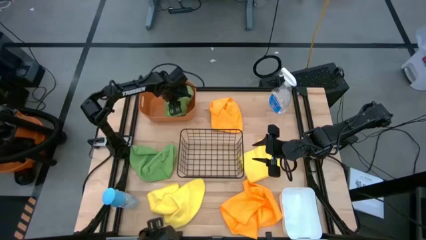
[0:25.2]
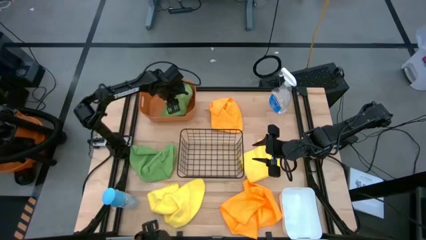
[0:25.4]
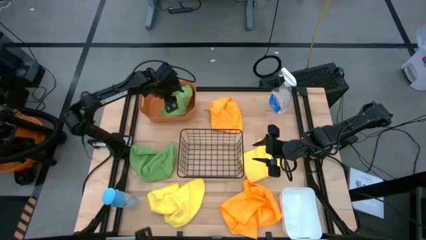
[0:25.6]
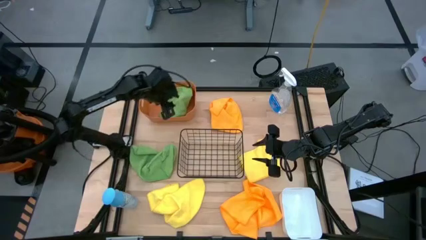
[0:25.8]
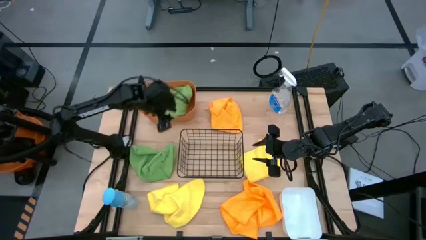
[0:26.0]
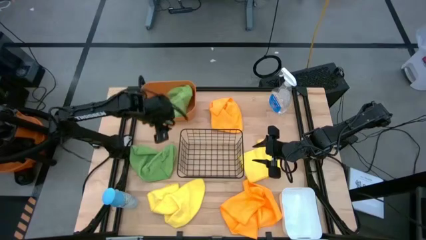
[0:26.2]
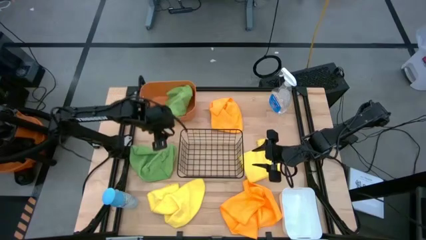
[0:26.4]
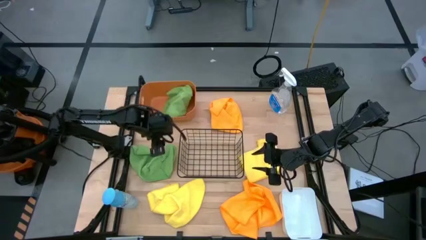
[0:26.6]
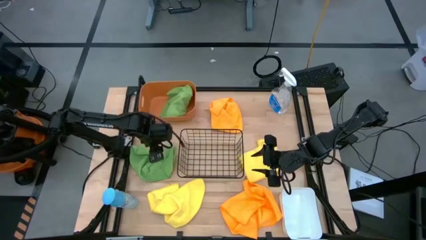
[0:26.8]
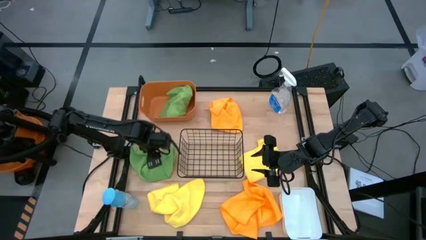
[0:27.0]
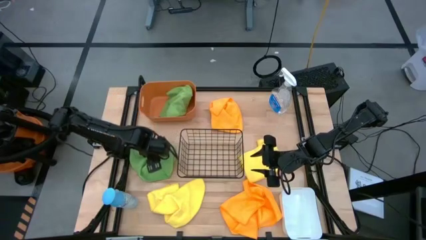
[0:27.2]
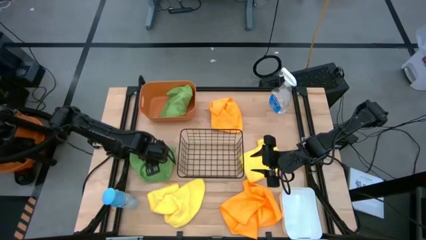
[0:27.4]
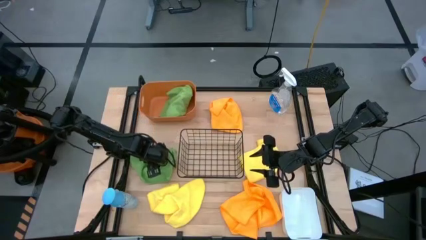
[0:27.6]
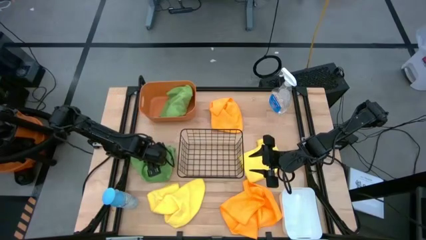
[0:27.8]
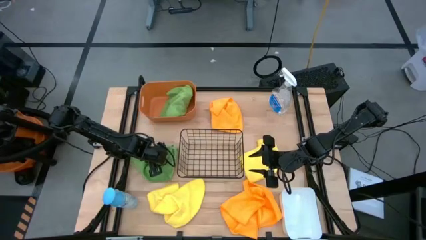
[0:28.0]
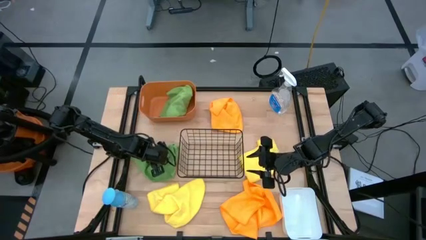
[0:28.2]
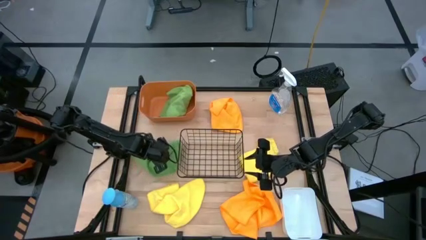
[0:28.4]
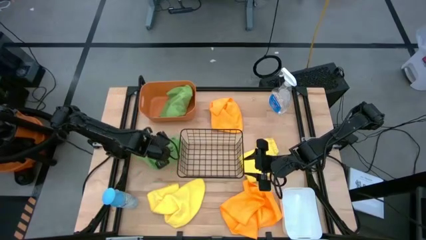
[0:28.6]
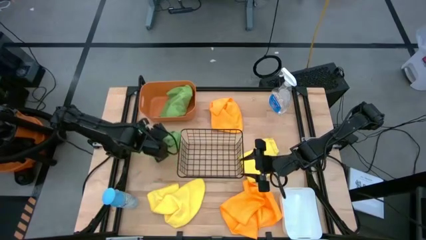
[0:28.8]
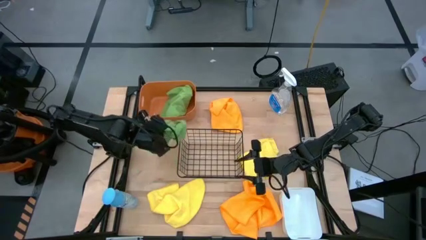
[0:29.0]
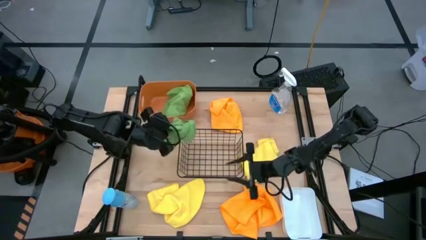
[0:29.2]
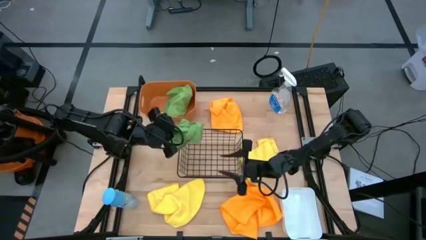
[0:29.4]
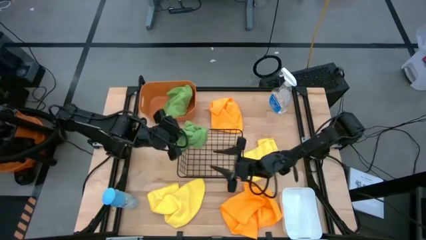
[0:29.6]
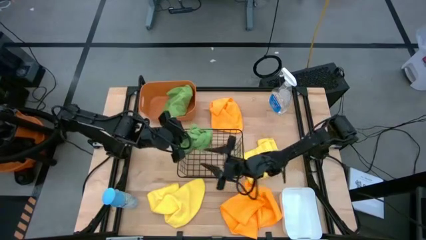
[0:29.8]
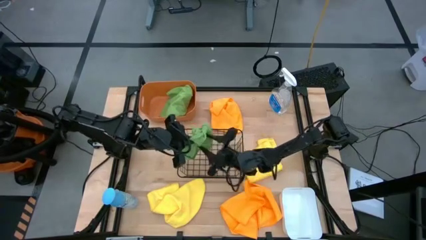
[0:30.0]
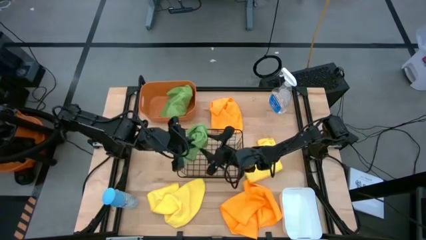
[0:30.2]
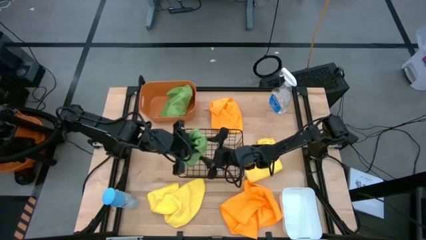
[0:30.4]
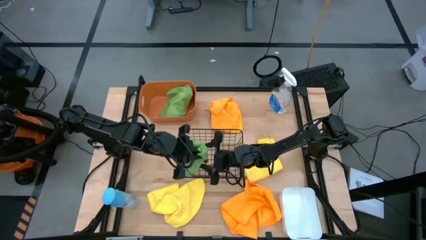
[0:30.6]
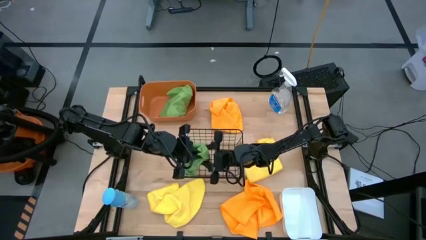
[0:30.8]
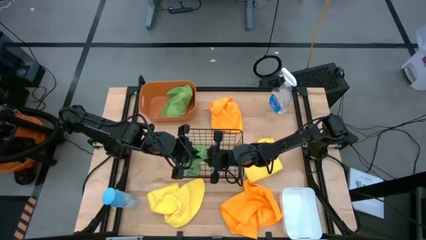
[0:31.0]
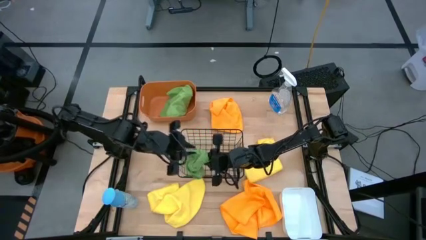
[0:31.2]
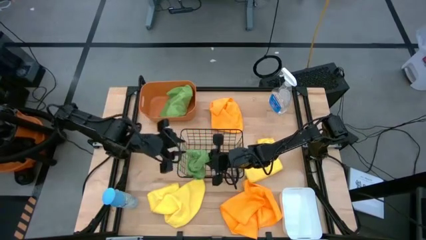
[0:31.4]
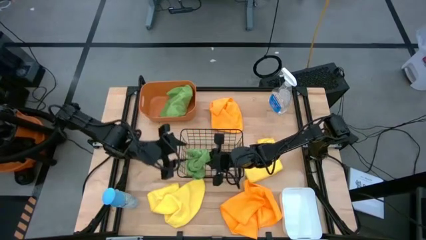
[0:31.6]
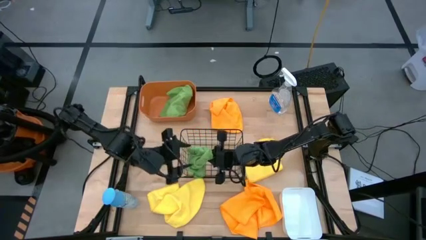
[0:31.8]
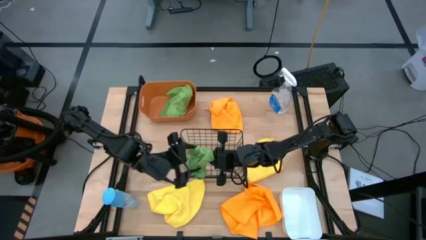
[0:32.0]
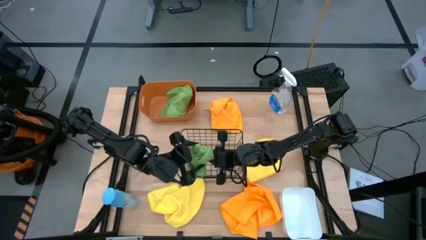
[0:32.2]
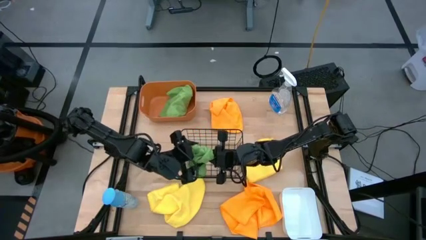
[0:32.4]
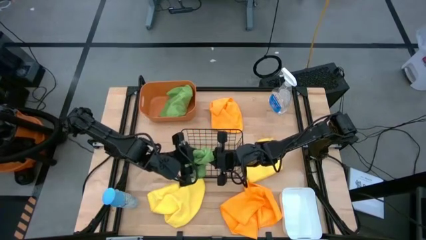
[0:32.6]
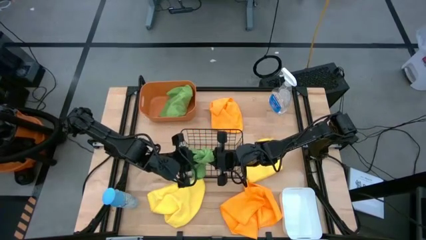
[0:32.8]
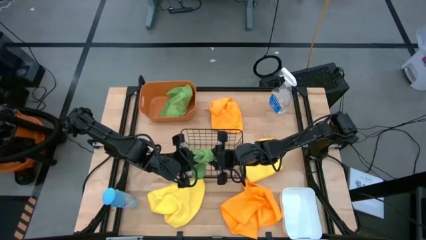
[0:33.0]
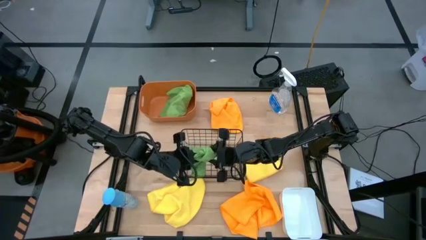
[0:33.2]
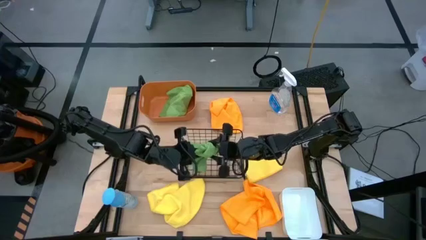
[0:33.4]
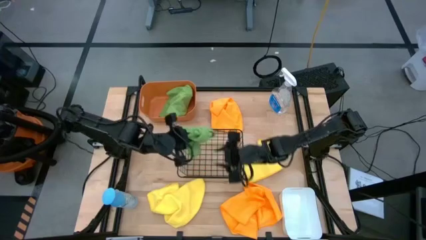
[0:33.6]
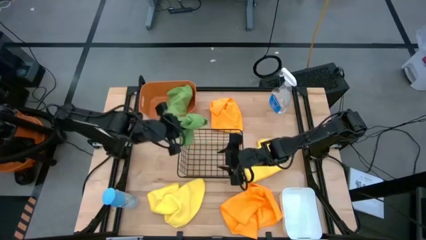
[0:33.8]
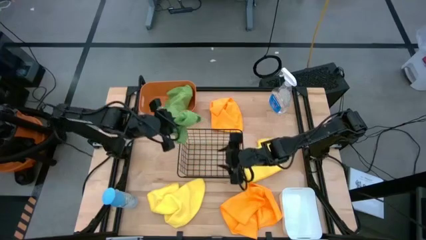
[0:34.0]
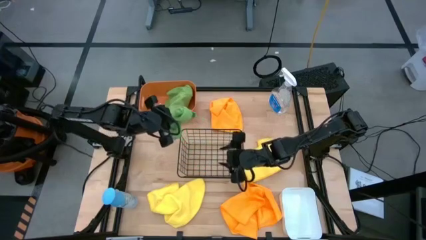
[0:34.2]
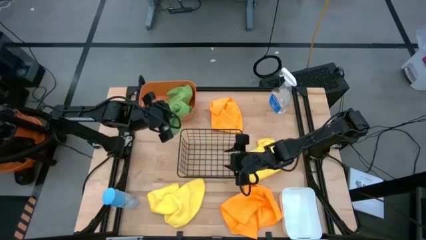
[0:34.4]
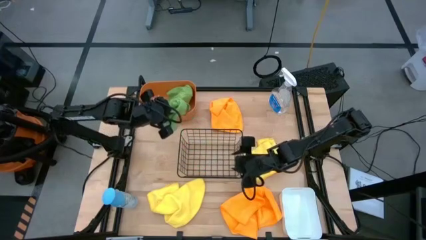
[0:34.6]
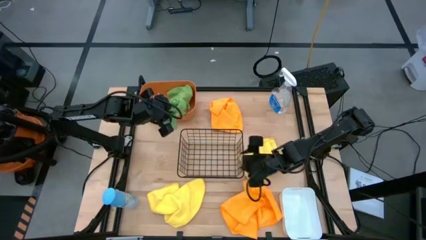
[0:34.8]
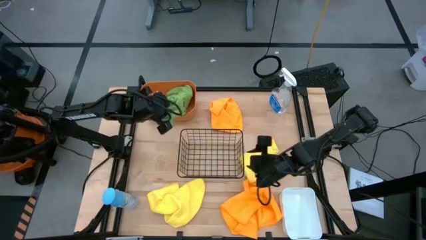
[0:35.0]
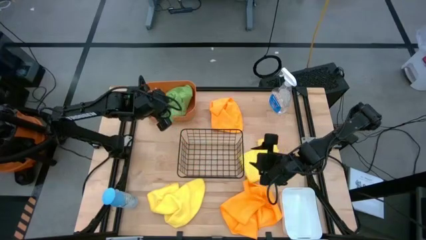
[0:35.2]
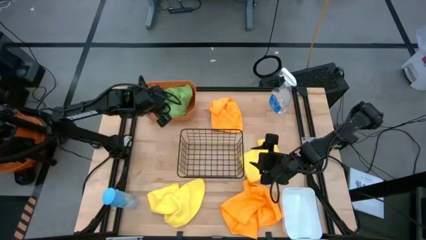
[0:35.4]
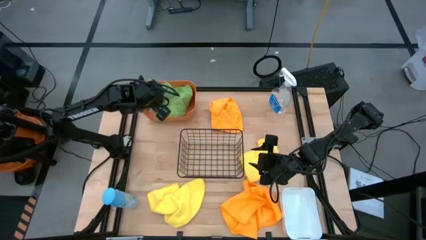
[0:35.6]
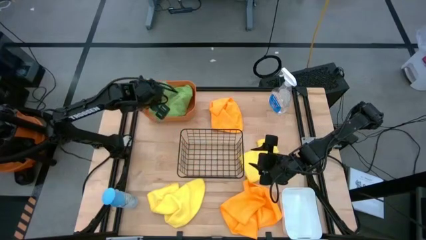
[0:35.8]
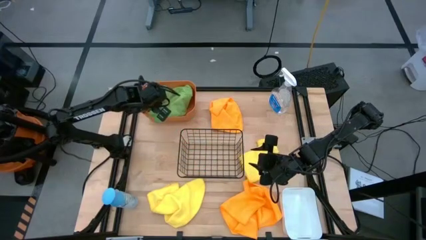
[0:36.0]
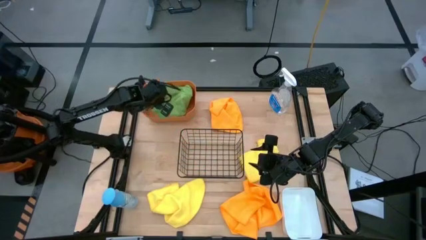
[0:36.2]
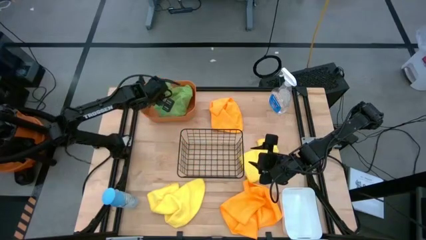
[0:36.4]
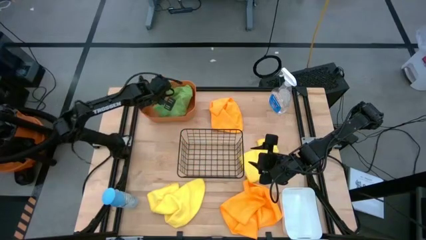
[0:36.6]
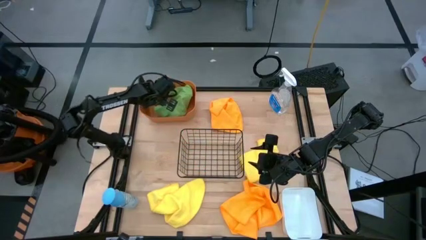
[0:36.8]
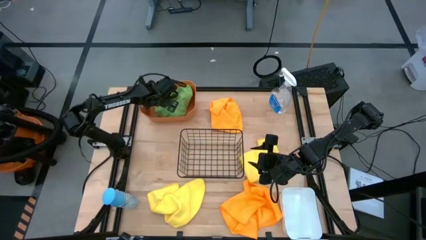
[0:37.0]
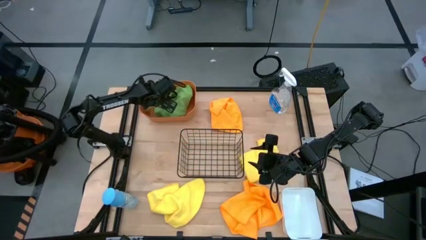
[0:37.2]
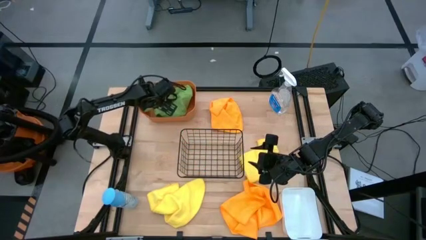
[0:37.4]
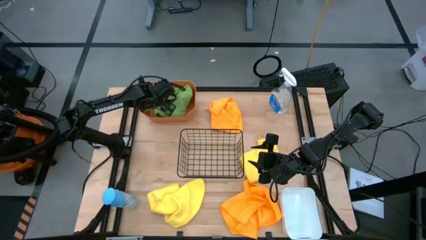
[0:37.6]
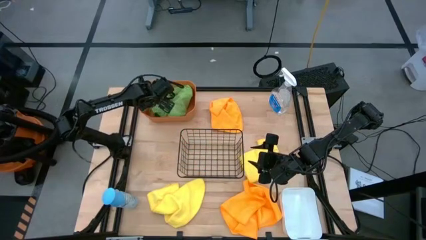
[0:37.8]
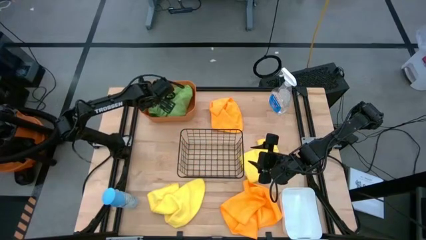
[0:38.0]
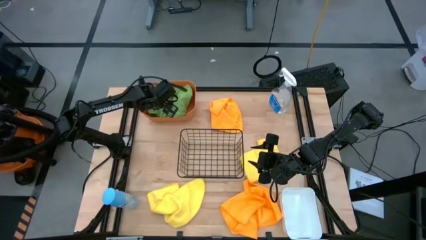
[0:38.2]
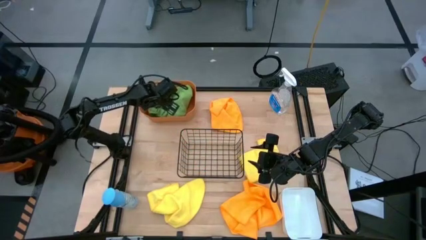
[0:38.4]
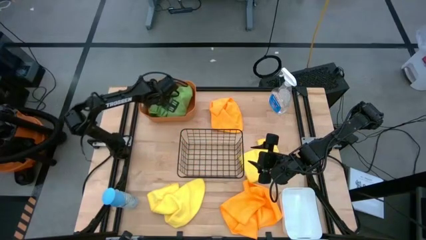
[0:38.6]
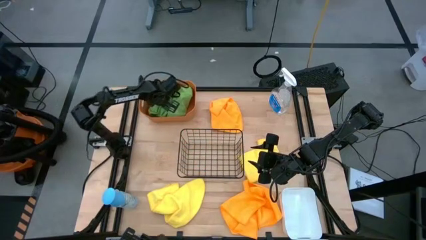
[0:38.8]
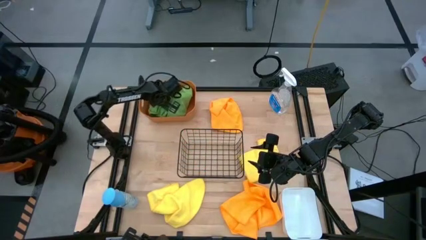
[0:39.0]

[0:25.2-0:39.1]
Task: Sort microfiber towel by color & place in baskets
Put the green microfiber cloth into the orange bin

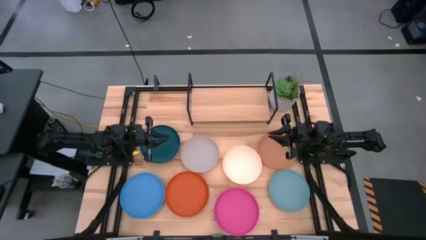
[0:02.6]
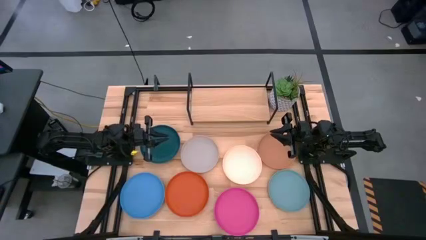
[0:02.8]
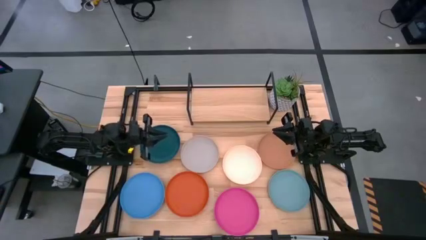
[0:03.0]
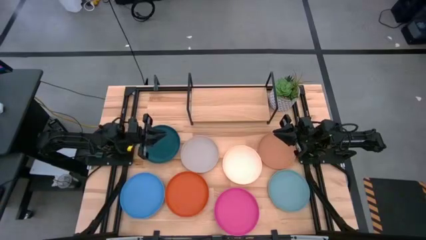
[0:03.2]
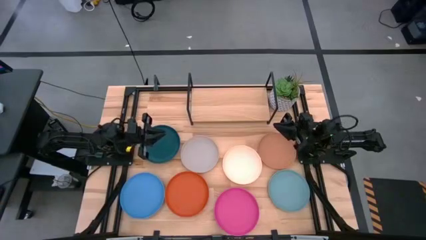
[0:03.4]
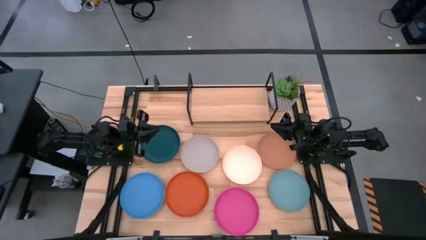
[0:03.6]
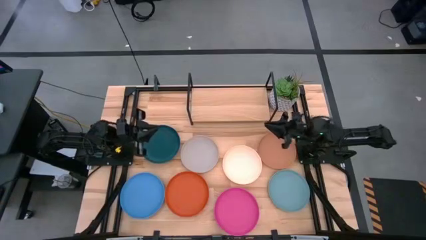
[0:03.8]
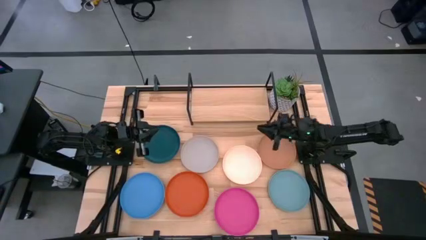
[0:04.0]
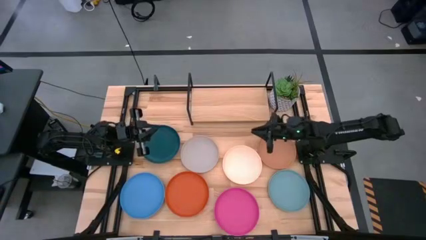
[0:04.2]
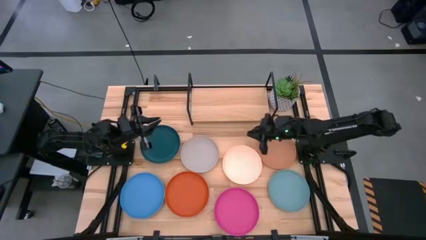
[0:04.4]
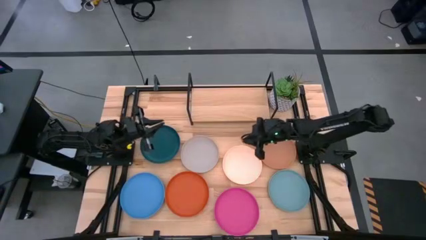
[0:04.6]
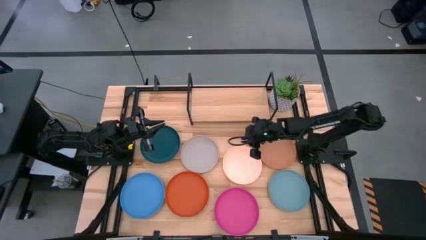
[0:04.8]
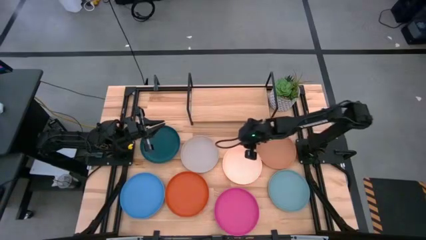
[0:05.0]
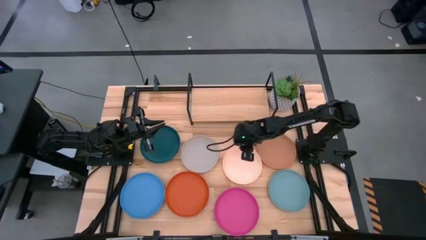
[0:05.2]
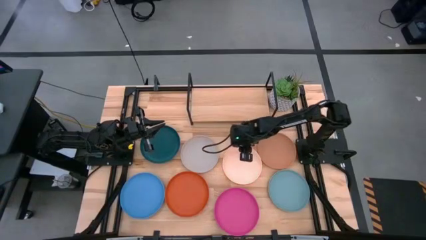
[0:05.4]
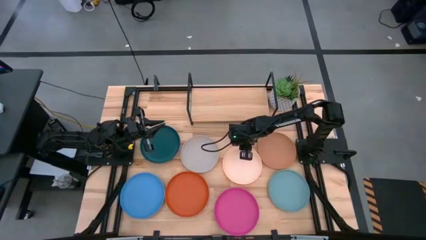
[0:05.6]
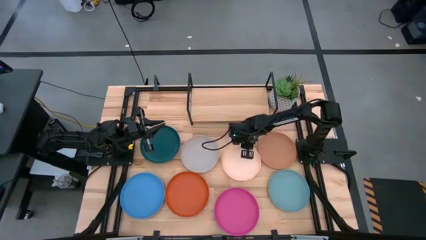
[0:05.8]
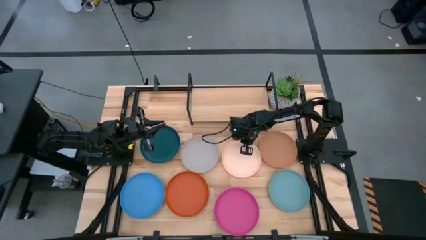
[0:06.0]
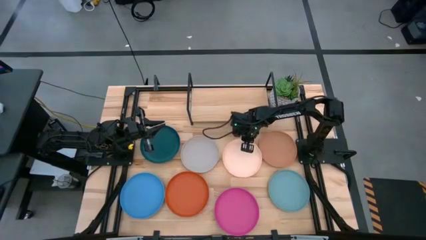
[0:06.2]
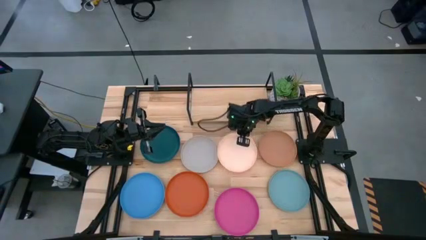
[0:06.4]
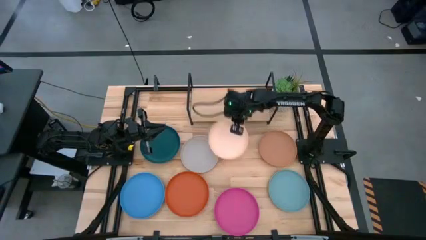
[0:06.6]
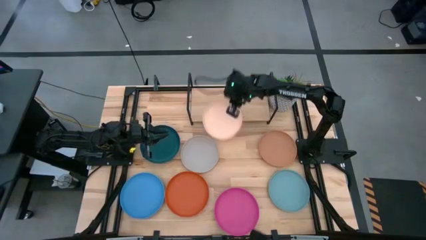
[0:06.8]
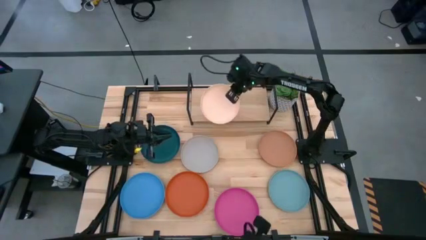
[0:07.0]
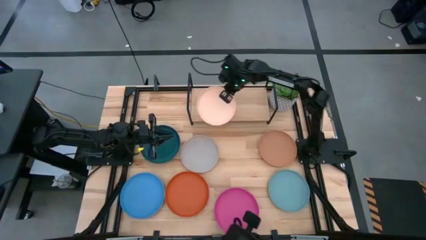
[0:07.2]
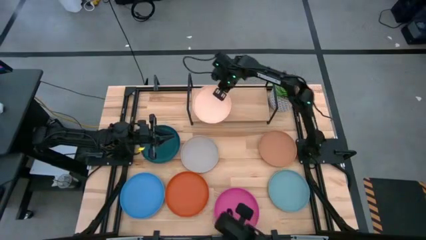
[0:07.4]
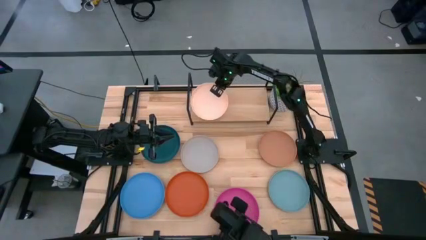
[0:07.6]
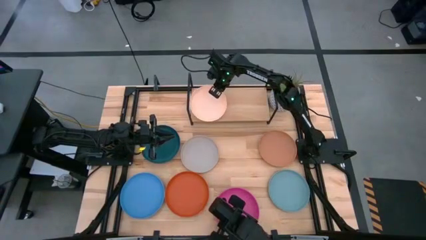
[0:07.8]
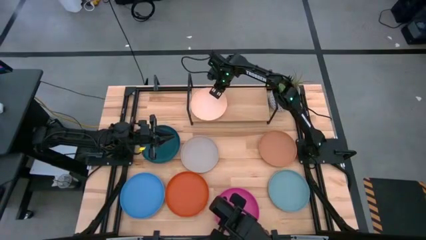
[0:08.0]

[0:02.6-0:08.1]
Task: Place and stack plates onto a shelf
Put the light pink plate on the shelf
